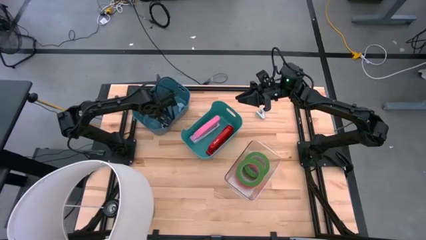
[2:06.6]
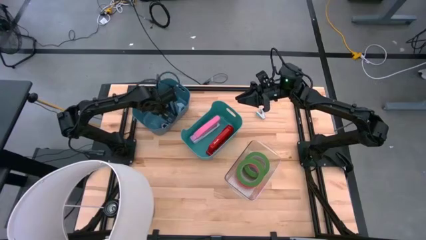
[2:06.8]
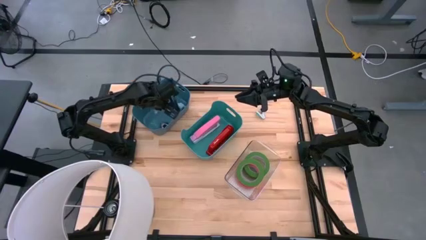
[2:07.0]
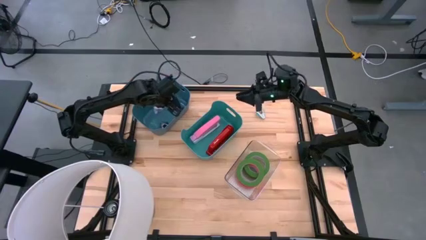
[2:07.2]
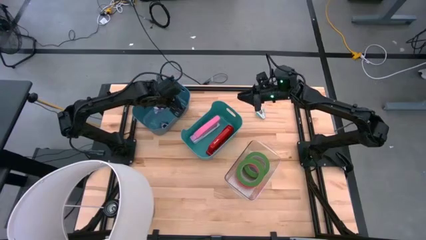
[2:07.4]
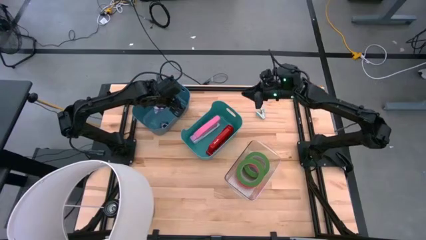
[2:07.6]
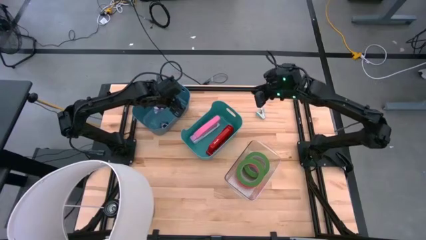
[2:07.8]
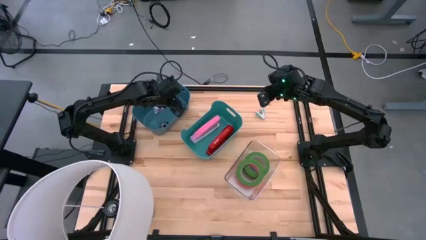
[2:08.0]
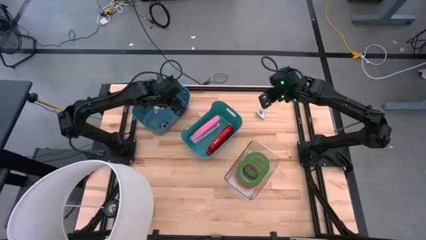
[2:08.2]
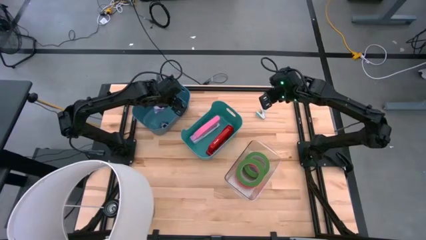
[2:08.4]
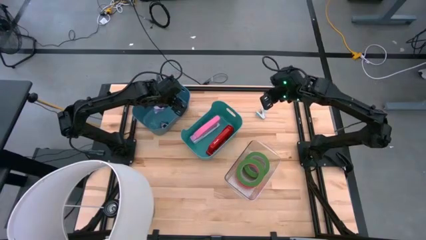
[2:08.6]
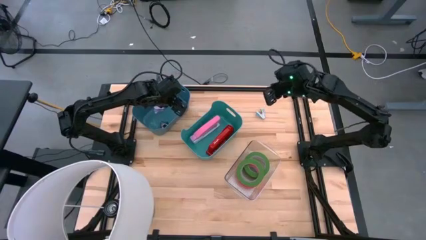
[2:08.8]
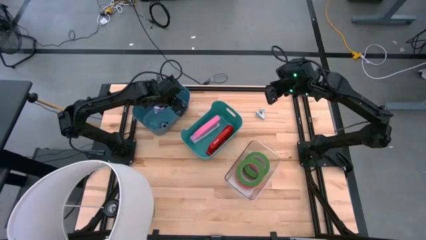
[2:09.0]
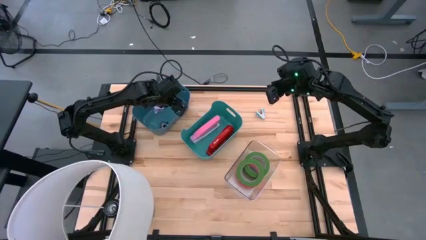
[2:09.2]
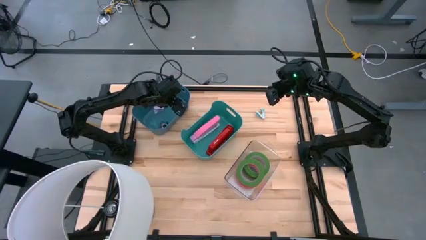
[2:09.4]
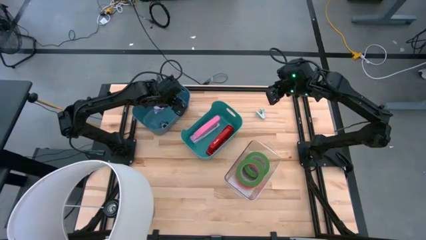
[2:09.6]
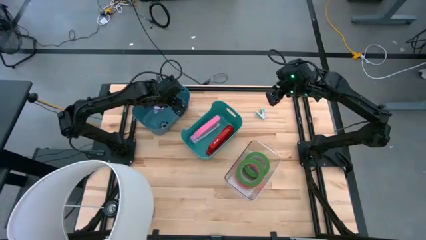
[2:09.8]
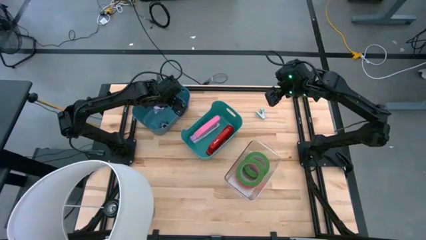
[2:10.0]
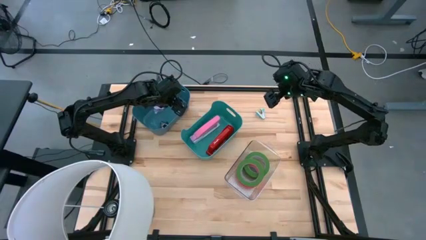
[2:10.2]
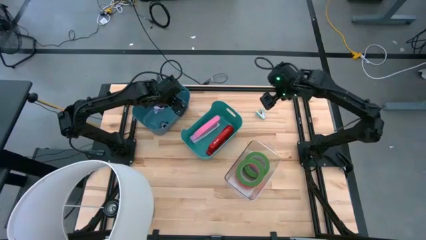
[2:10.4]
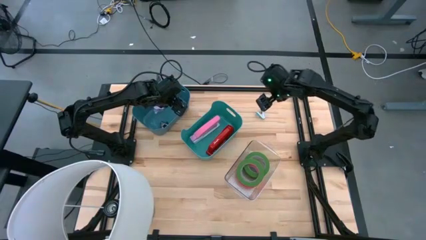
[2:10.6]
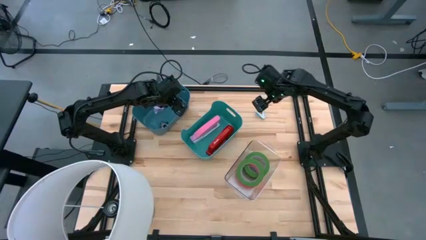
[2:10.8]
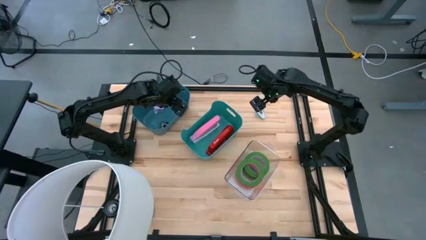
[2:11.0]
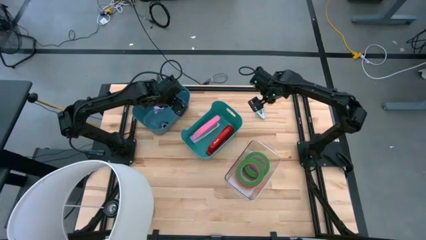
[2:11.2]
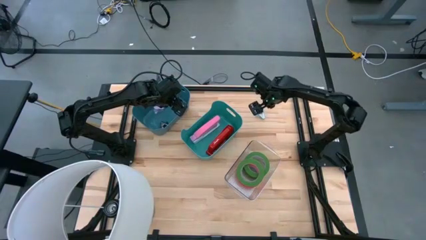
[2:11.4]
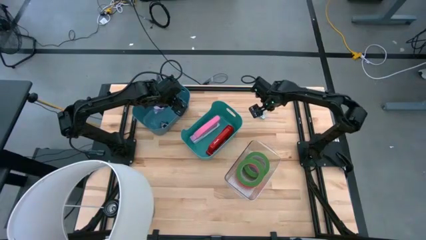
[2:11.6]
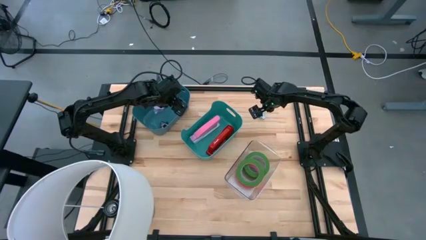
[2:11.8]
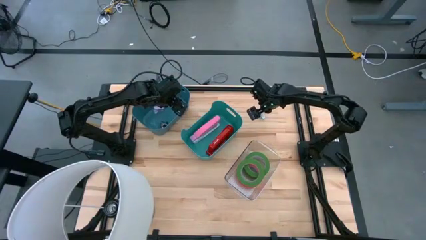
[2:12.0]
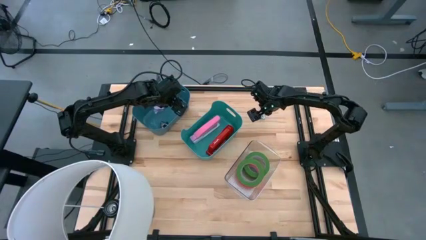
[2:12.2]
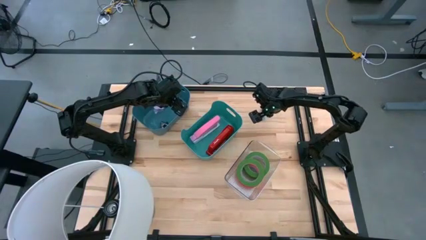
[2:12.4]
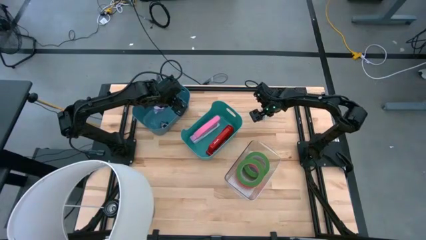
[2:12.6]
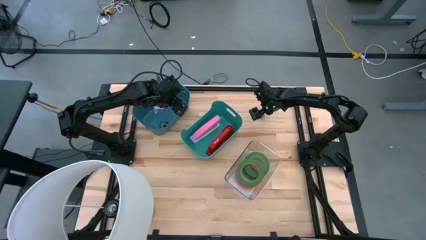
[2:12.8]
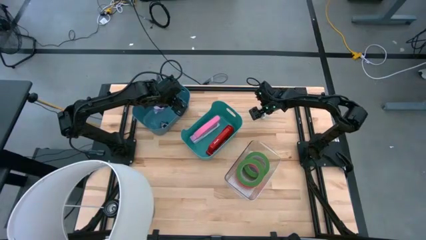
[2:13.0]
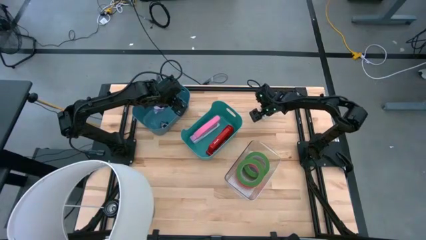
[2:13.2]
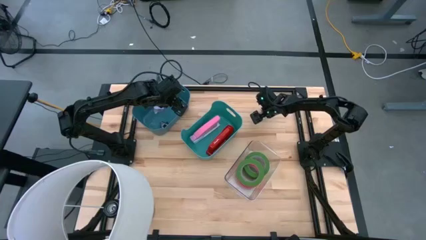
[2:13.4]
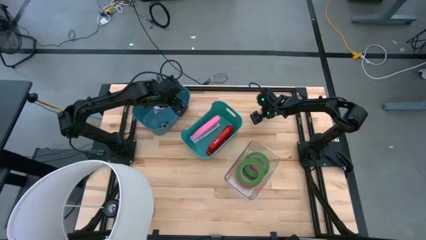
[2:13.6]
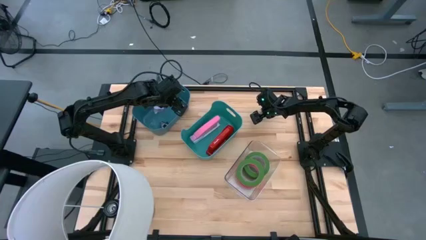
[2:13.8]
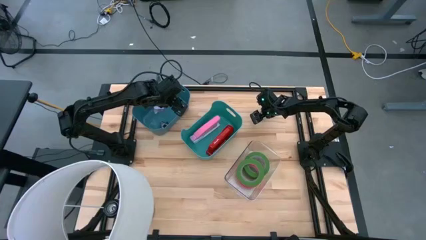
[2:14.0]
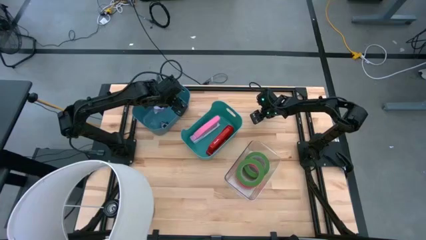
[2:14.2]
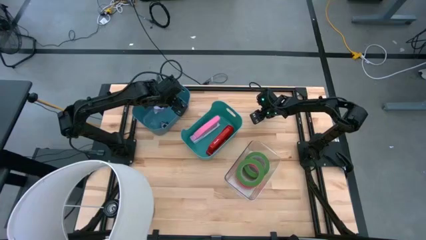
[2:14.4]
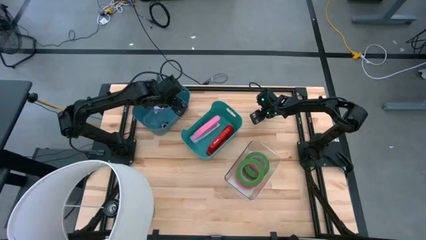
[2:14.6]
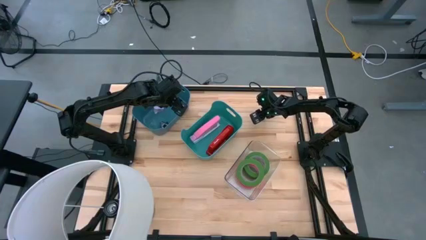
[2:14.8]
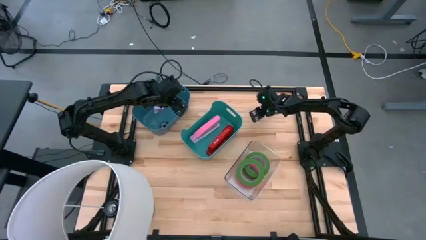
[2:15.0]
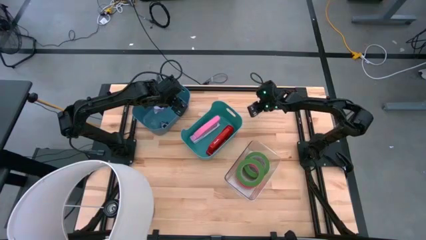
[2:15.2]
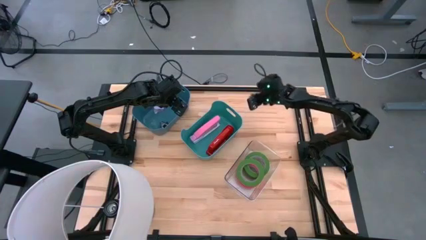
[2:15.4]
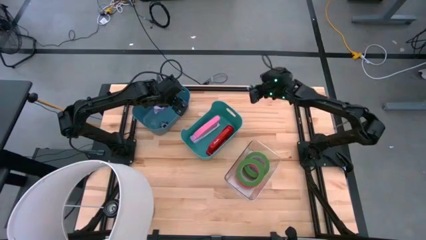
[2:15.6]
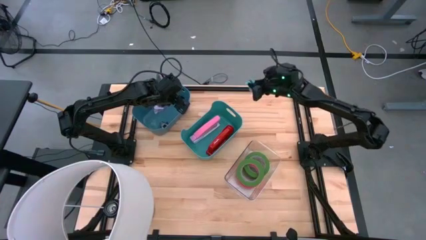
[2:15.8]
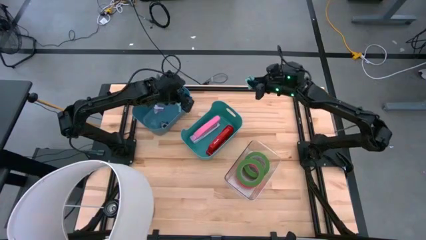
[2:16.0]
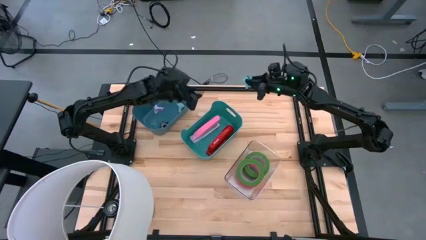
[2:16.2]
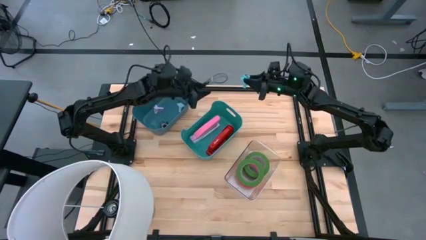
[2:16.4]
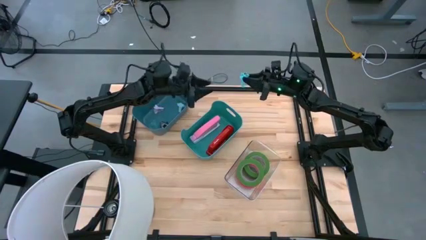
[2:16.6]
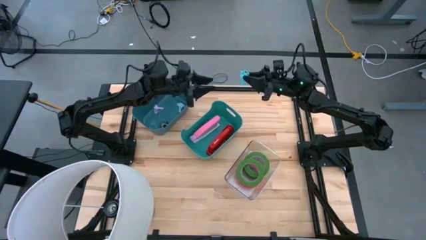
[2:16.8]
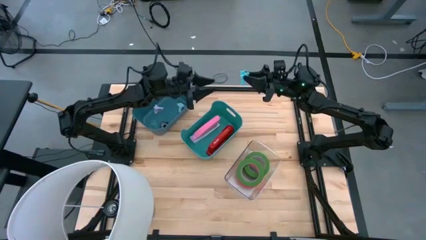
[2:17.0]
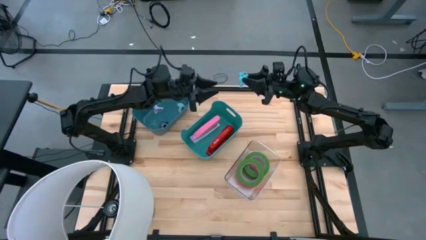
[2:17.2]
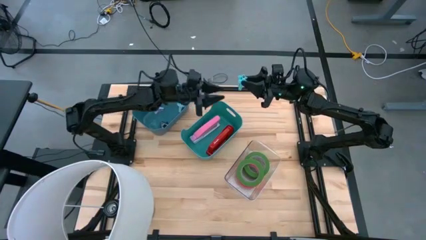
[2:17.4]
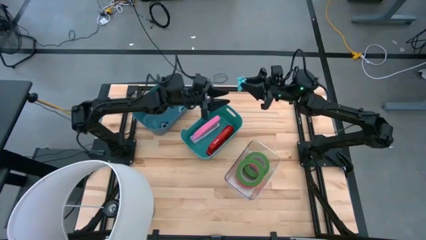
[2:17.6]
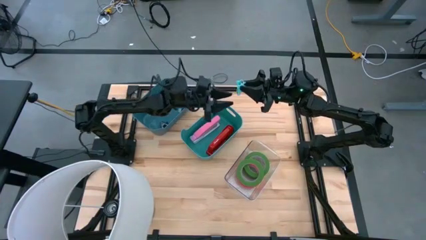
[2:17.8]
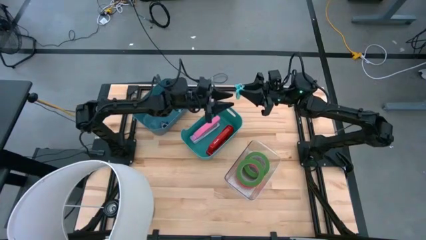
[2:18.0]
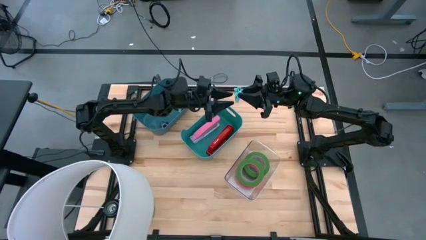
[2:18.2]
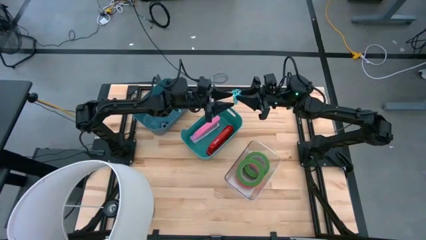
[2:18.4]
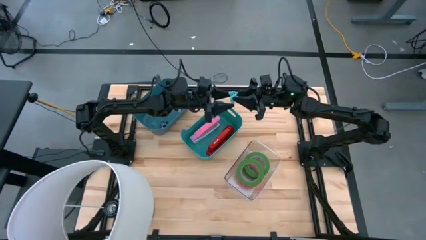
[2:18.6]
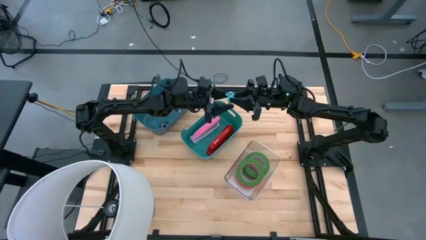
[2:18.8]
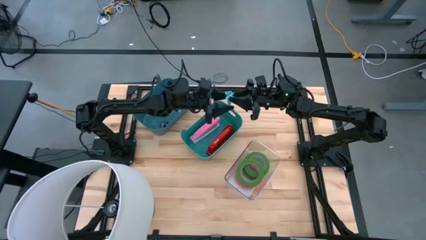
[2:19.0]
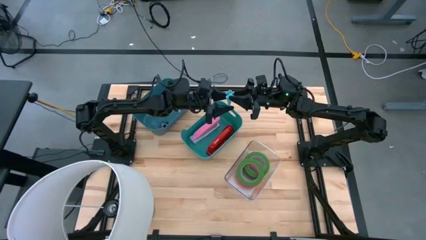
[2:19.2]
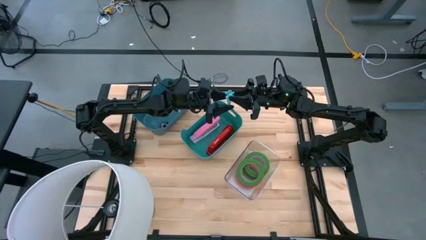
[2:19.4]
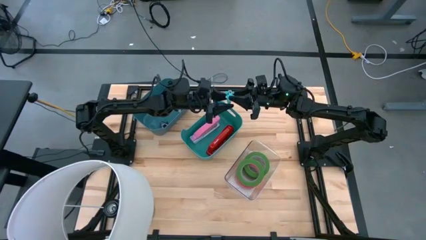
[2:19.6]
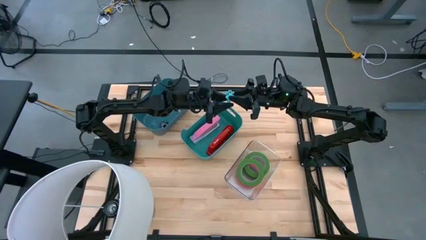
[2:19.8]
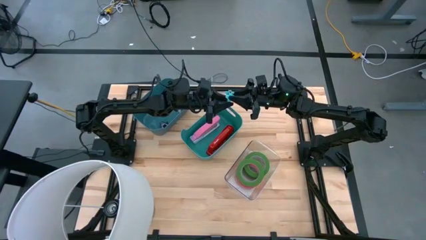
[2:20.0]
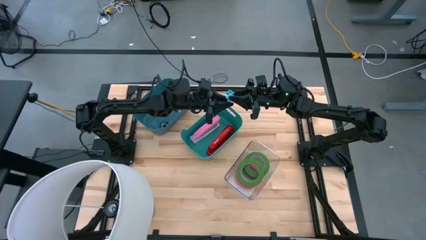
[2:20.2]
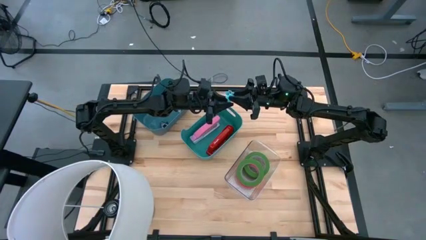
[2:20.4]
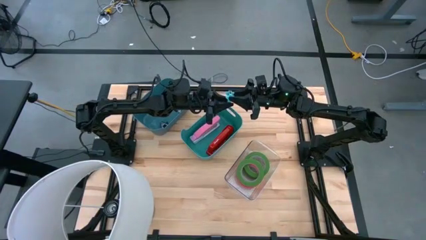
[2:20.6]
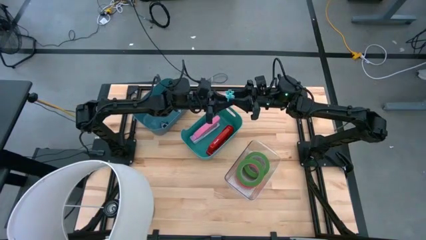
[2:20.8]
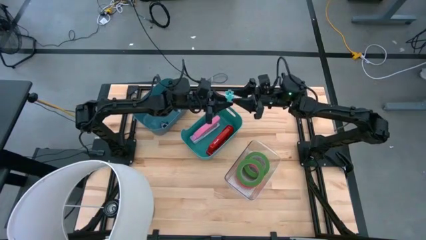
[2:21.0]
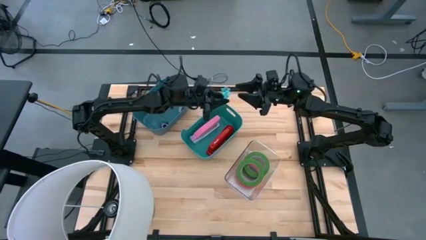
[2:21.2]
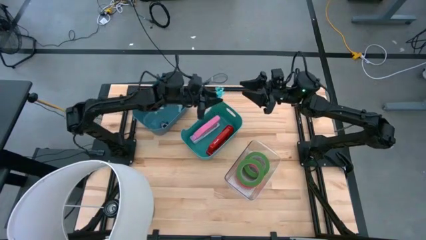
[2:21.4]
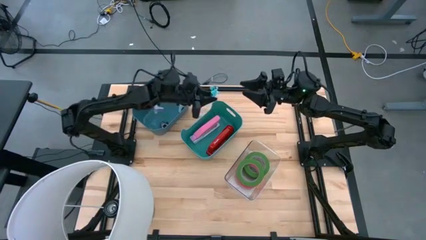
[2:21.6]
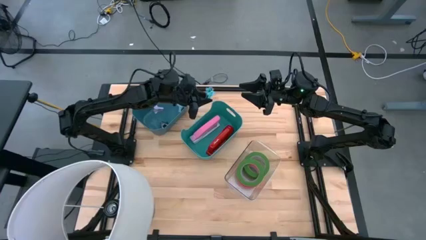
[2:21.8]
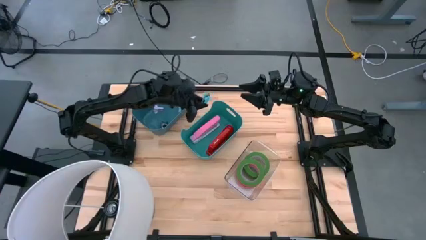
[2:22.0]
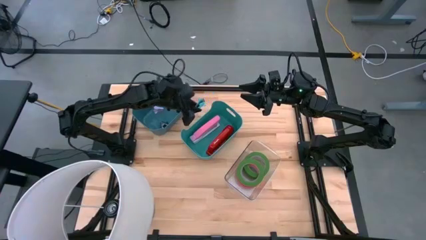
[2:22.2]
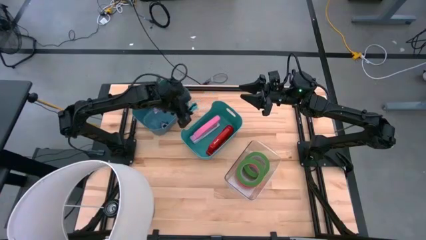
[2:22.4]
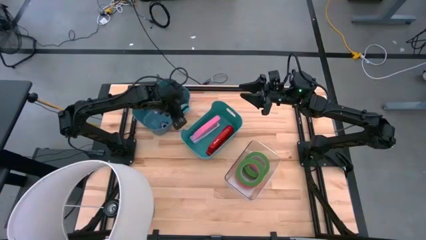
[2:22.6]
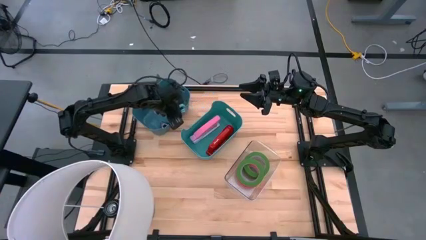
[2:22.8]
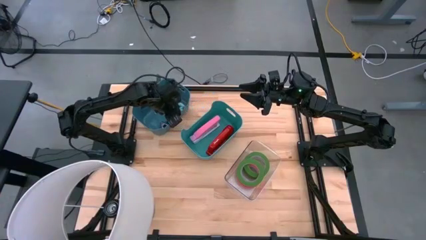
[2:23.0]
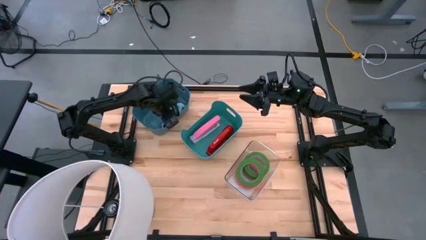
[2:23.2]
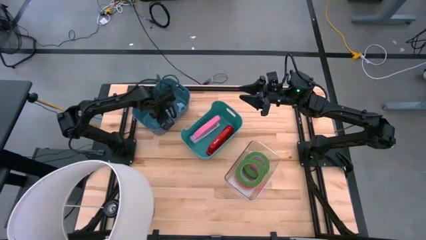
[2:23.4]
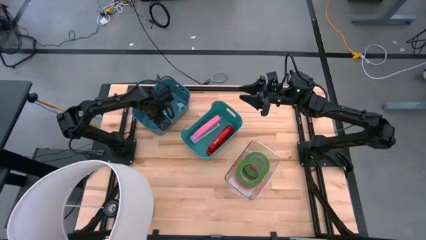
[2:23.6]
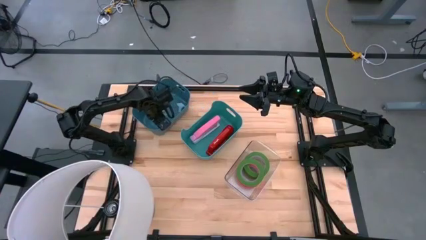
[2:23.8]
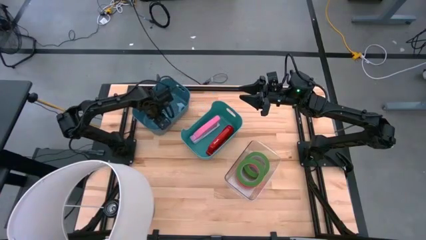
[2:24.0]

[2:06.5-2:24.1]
Task: Pick and place Stapler, Stapler remover, tape
Put the green staple remover into the blue bin
